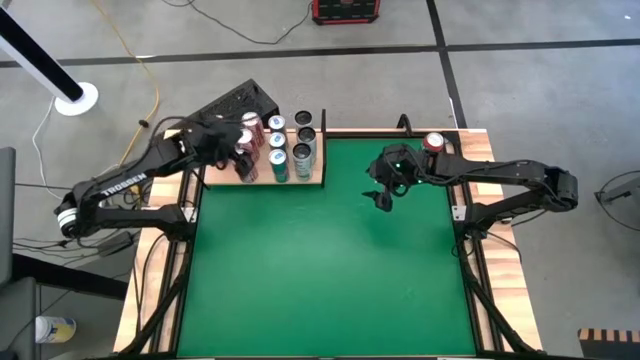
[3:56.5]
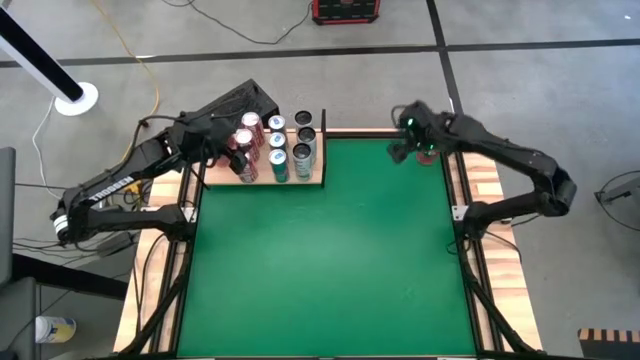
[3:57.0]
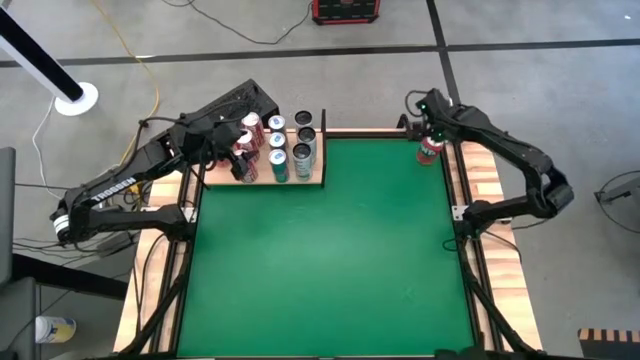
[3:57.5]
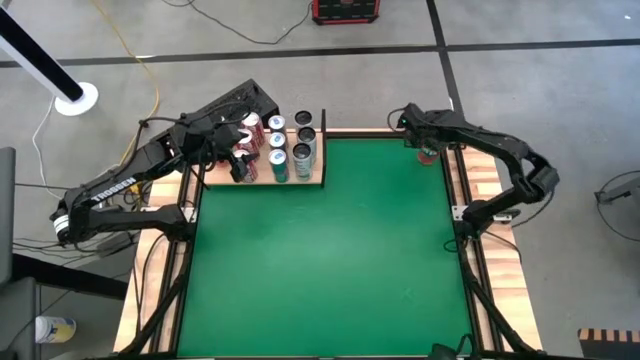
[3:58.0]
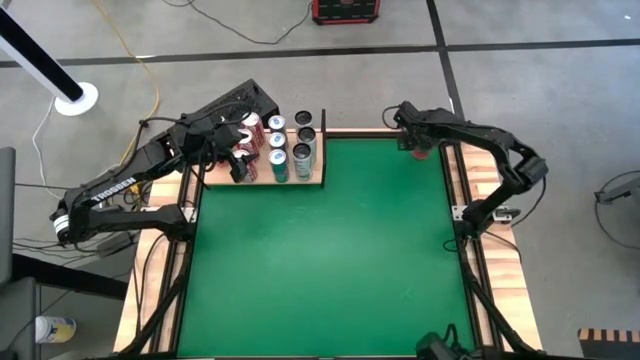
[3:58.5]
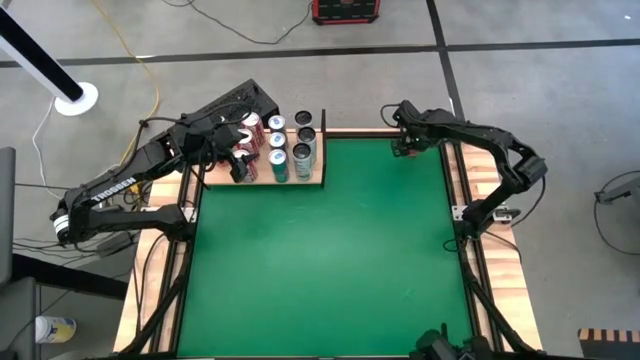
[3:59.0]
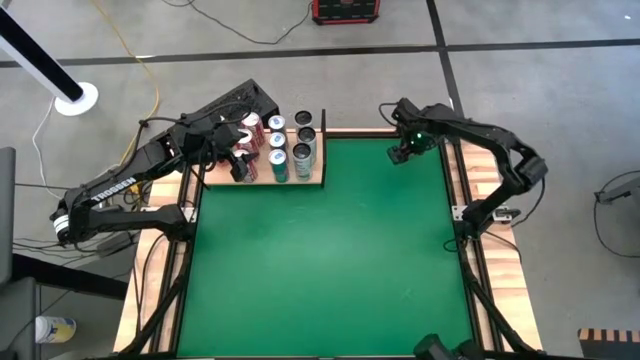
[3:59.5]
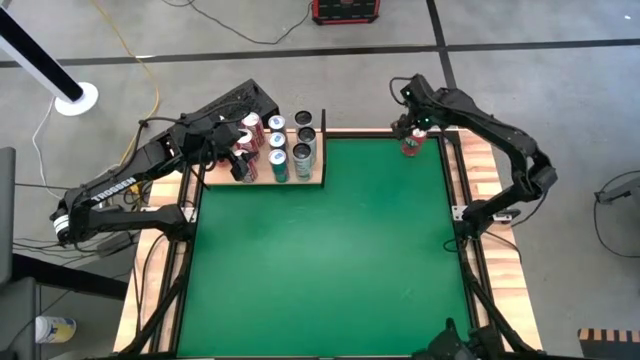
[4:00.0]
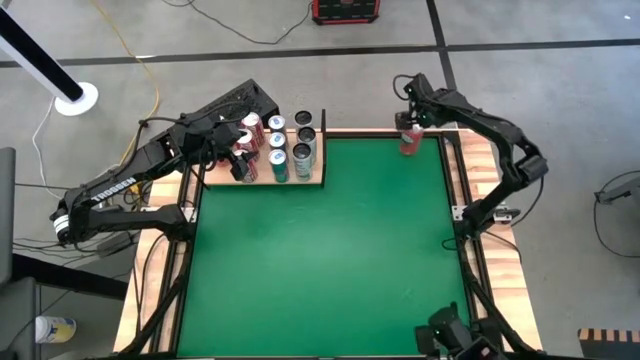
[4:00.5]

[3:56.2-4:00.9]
Task: Place canned beverage on shelf
Put the red soda can on the shelf aligned with the other red soda cans

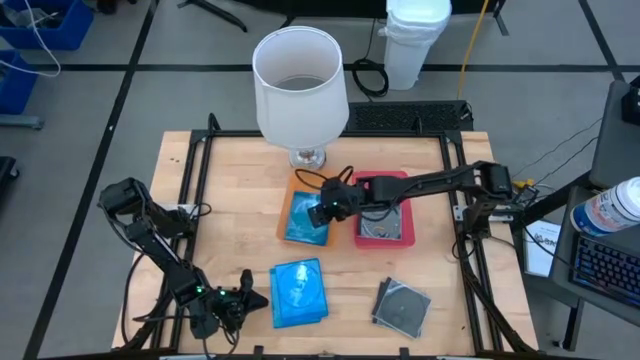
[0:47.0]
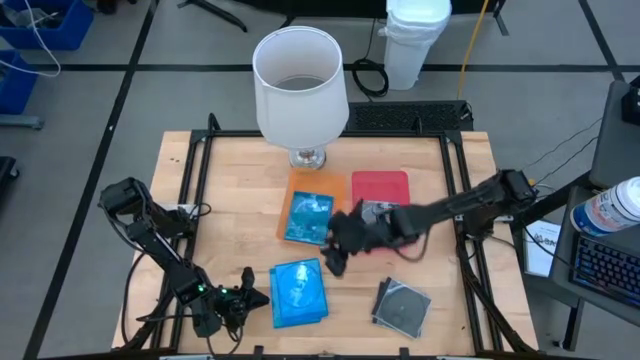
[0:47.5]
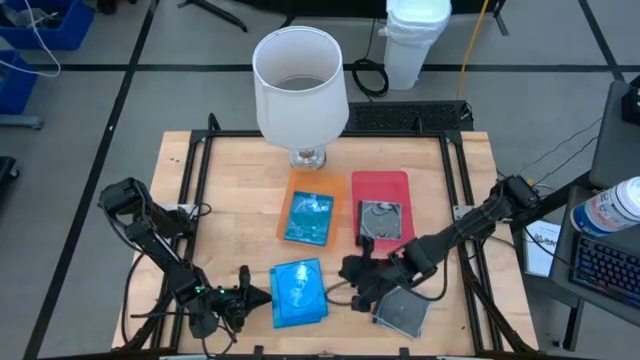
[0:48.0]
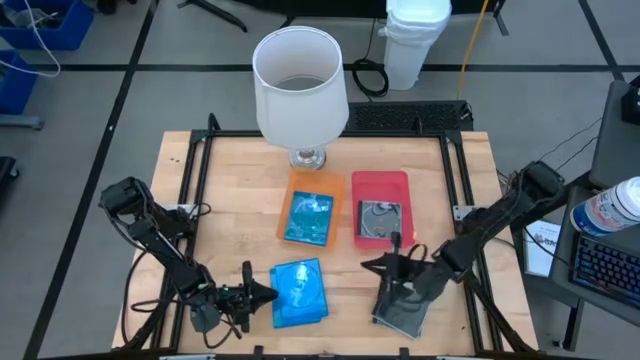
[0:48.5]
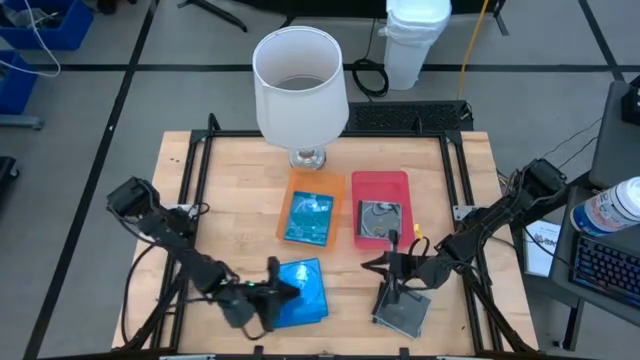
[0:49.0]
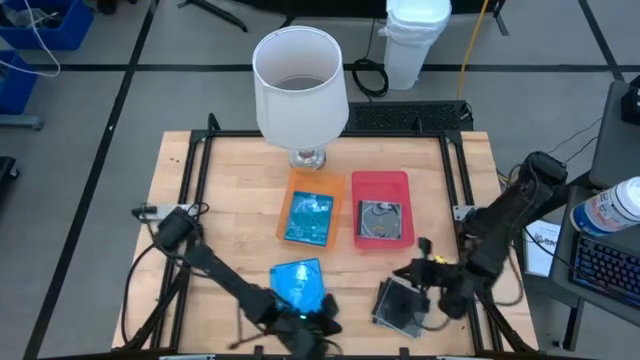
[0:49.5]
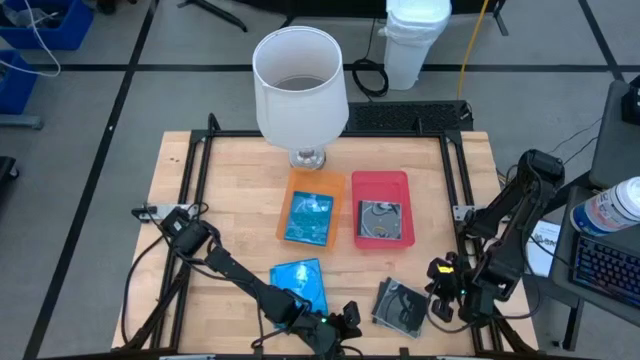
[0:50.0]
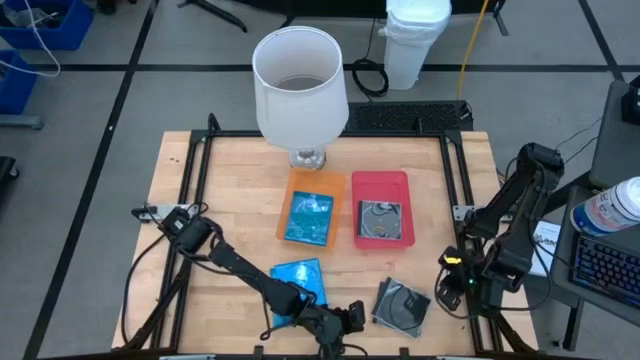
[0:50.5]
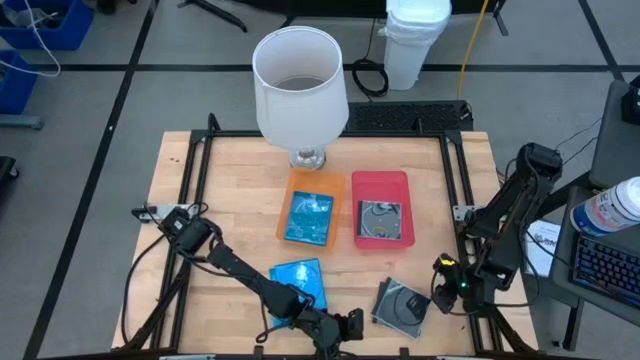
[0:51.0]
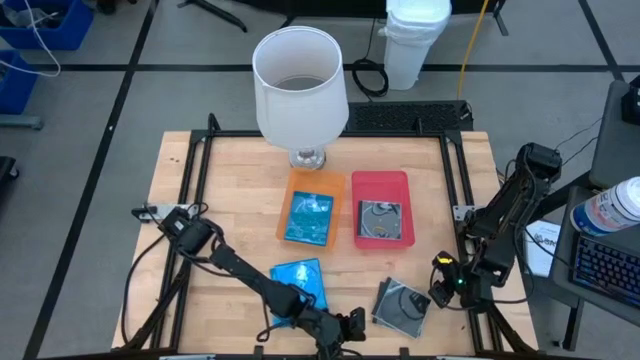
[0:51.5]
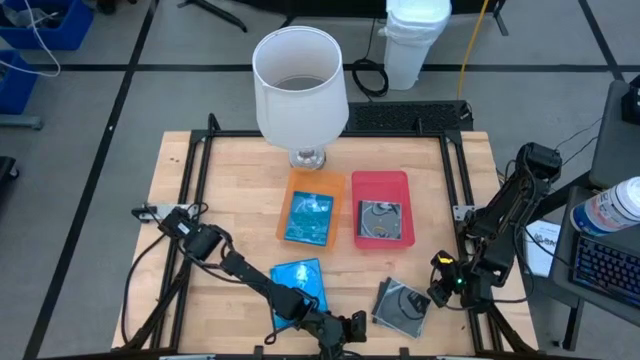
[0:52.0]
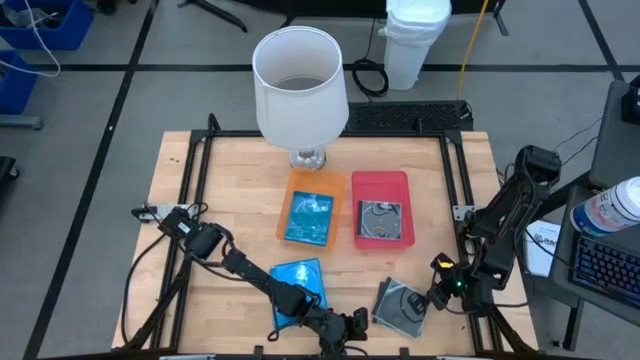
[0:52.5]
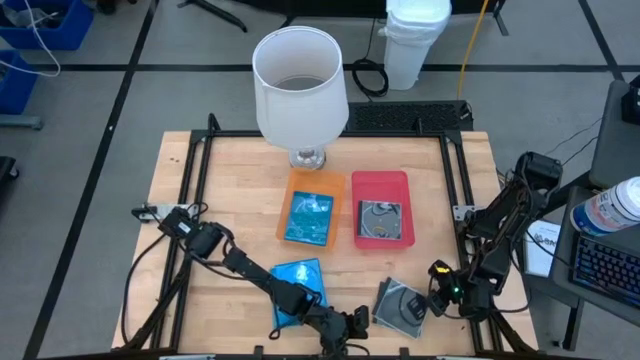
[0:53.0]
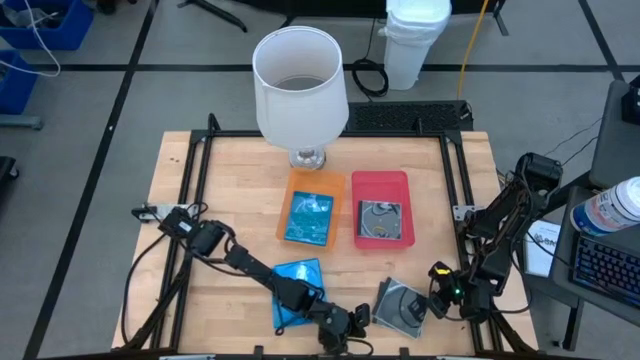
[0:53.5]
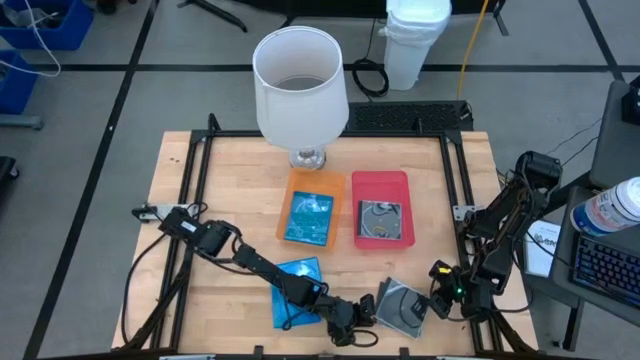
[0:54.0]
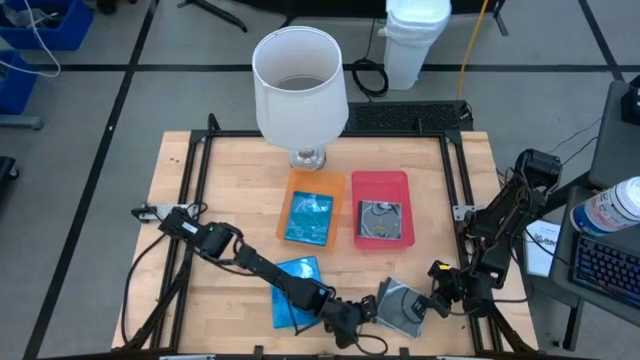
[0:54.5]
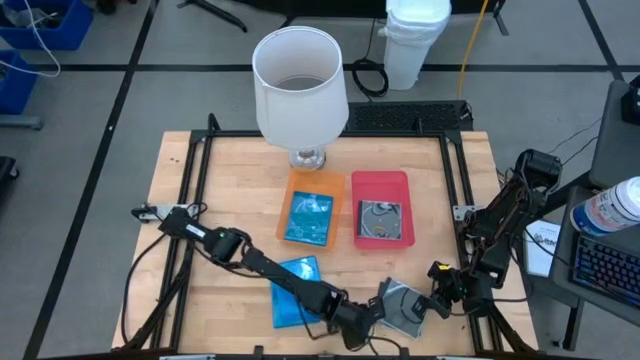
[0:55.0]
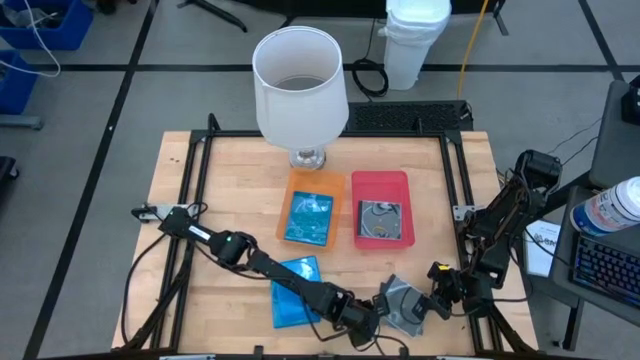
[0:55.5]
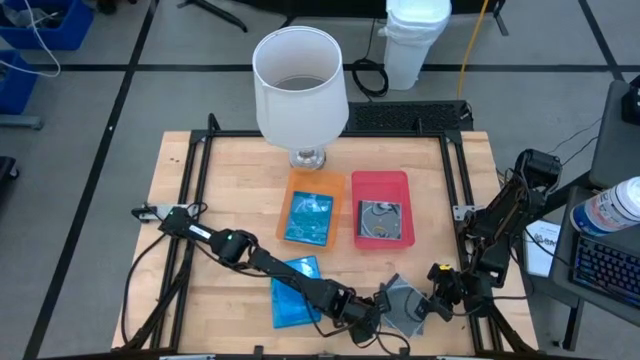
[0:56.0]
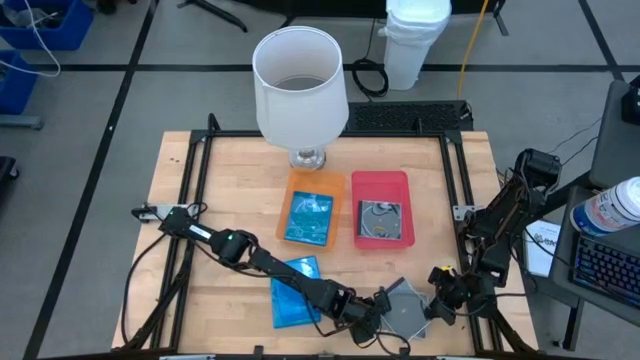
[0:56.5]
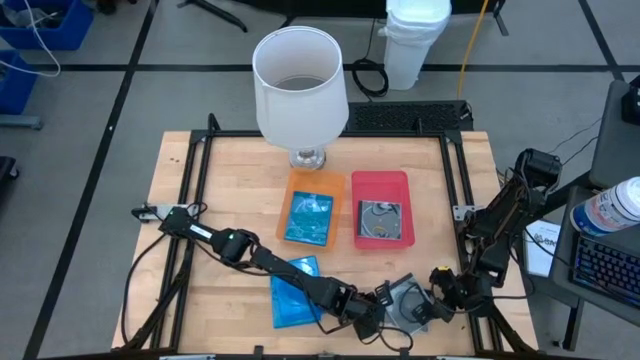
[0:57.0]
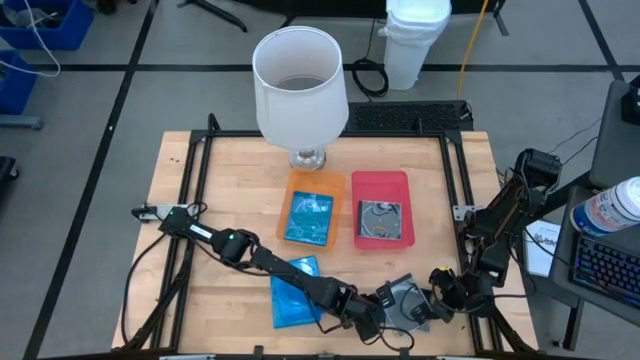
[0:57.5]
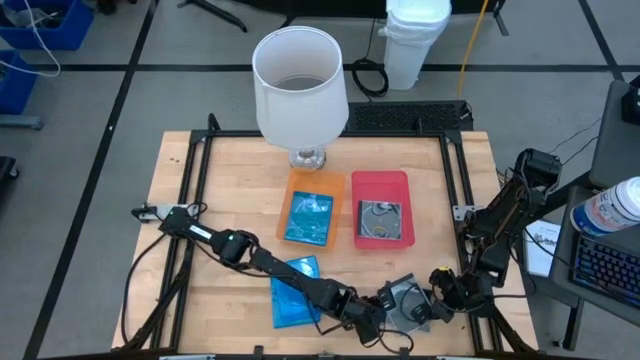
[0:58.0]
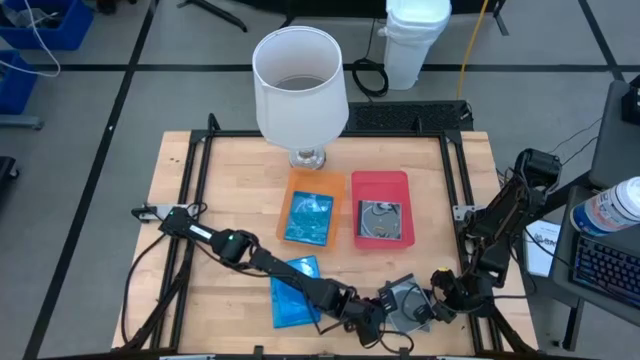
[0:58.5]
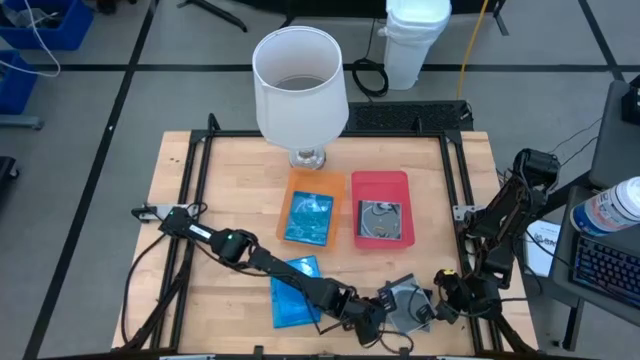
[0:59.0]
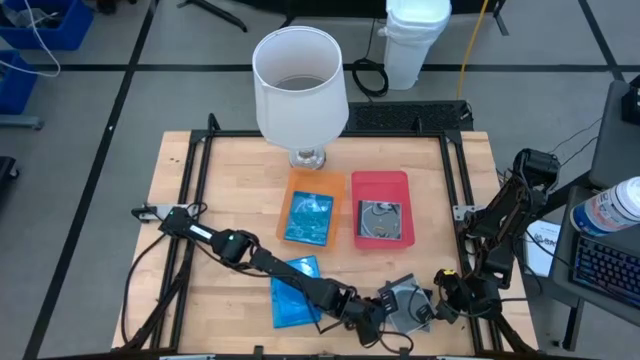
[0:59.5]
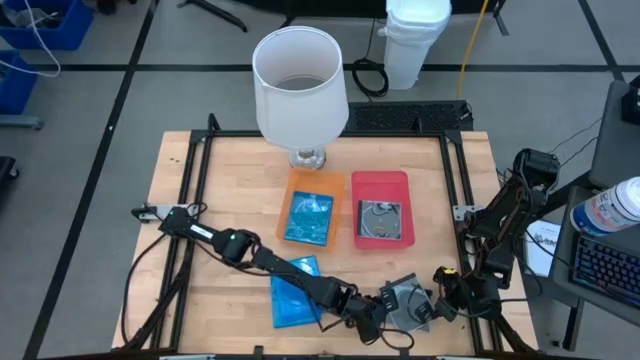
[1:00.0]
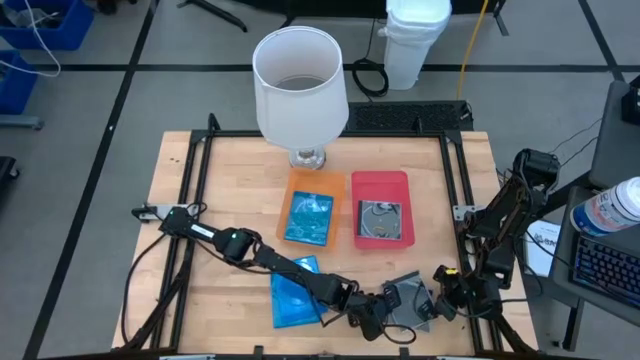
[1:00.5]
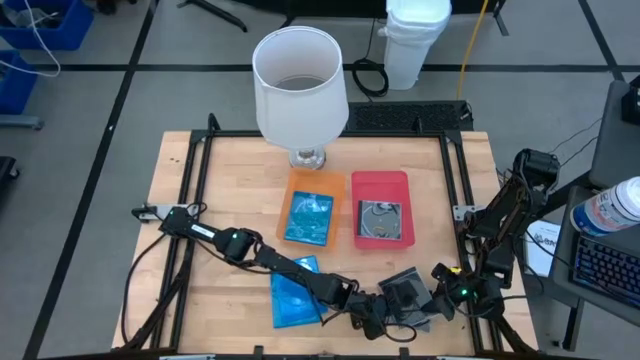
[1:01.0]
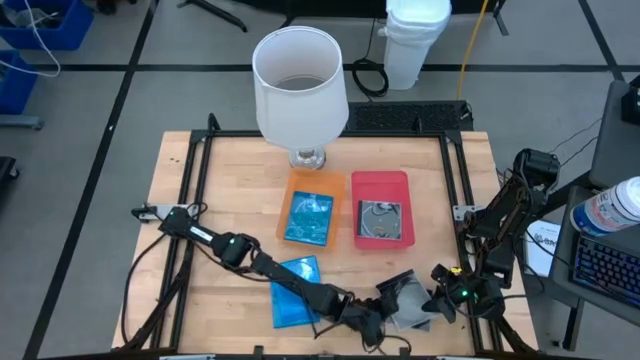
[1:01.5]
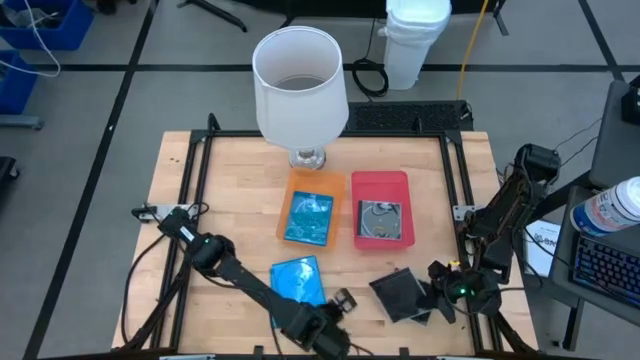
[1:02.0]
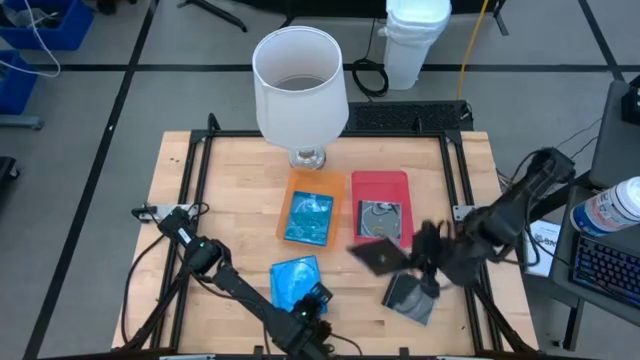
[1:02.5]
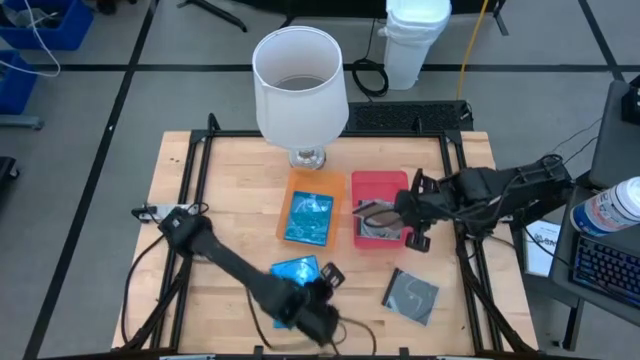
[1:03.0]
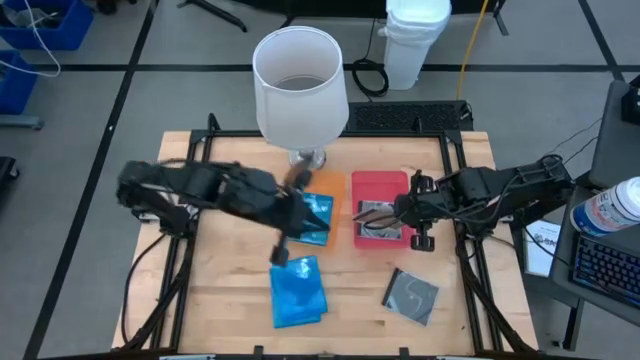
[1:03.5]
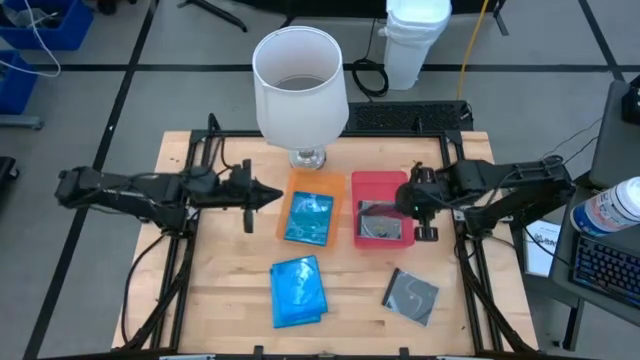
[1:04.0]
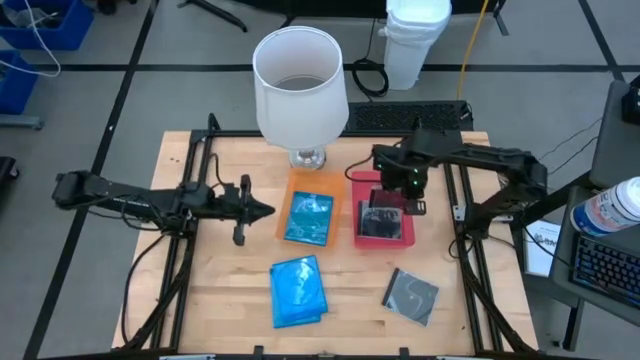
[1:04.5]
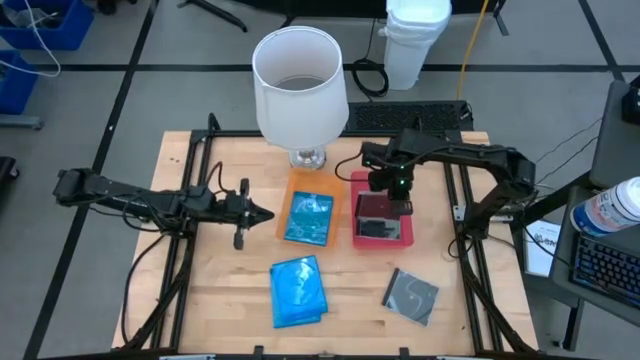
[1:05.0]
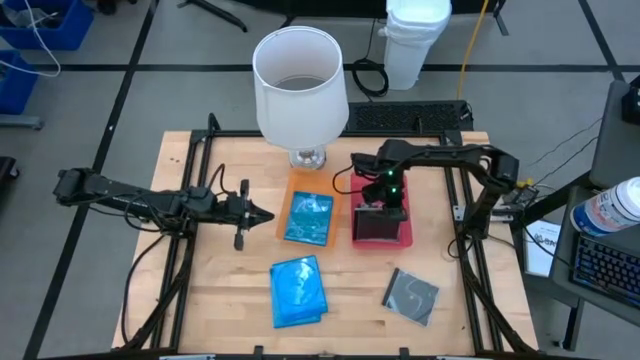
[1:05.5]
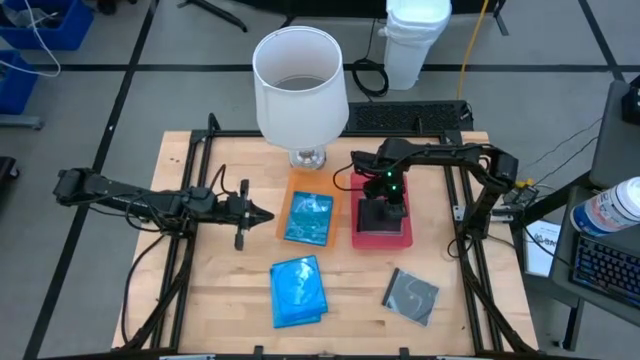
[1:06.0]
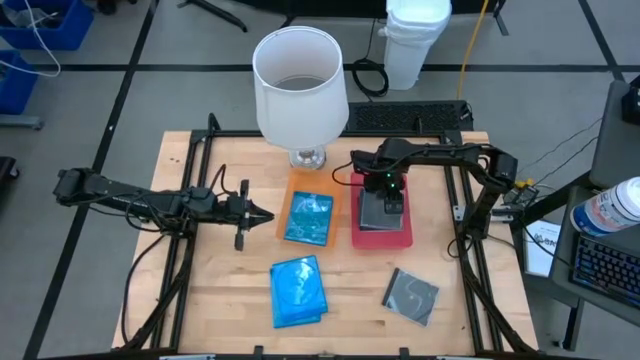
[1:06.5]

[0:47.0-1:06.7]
Task: Pick & place jewel cases by type
Put the black CD case into the red bin
